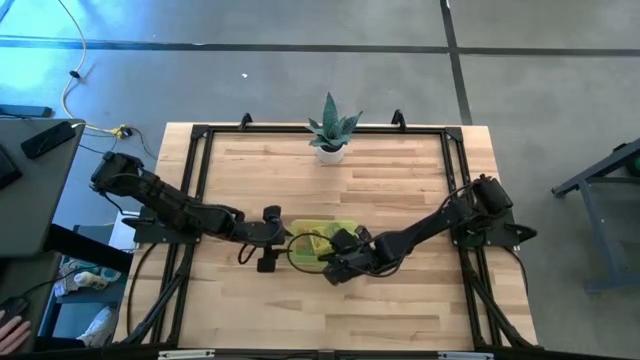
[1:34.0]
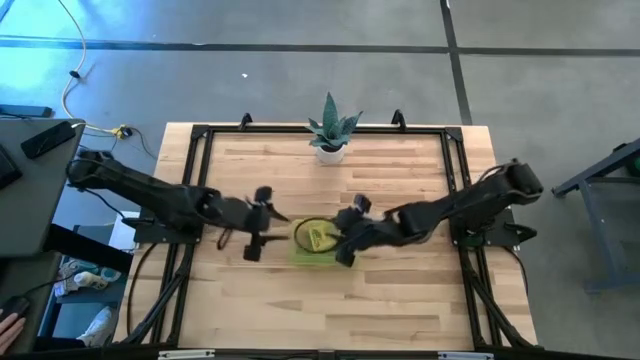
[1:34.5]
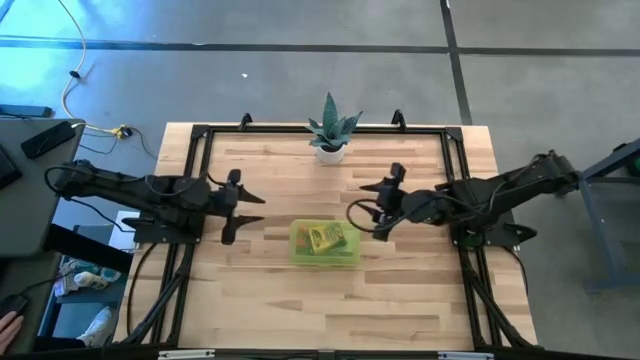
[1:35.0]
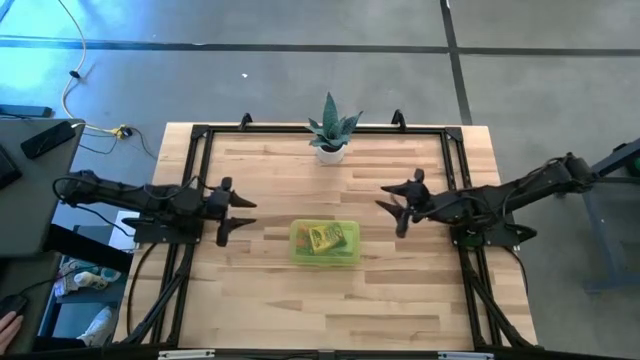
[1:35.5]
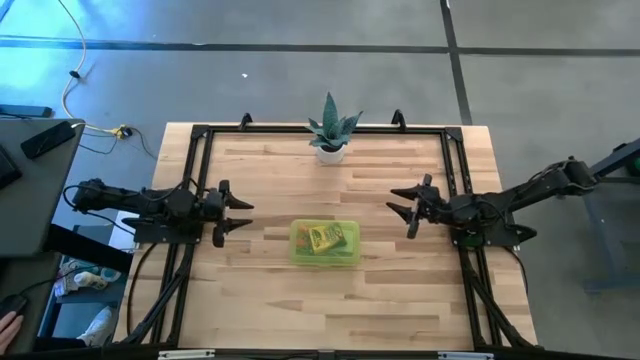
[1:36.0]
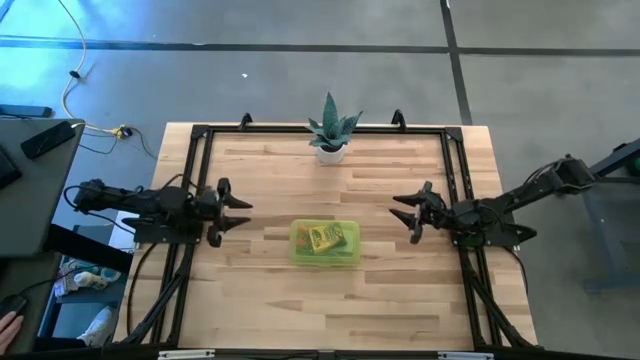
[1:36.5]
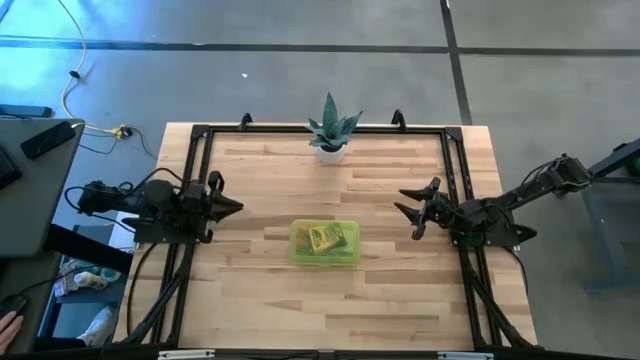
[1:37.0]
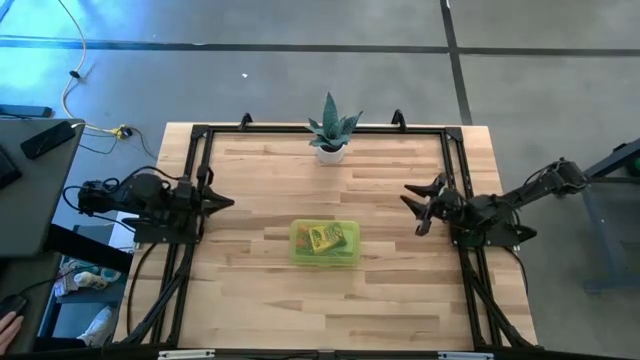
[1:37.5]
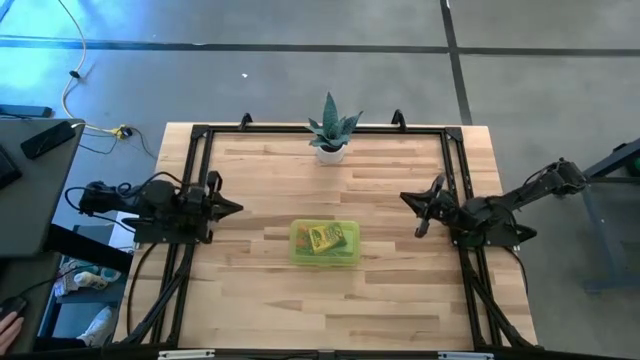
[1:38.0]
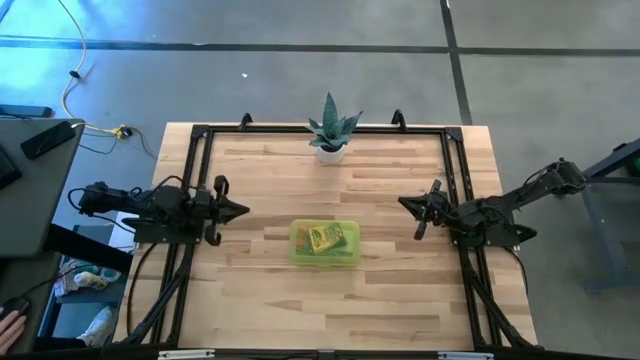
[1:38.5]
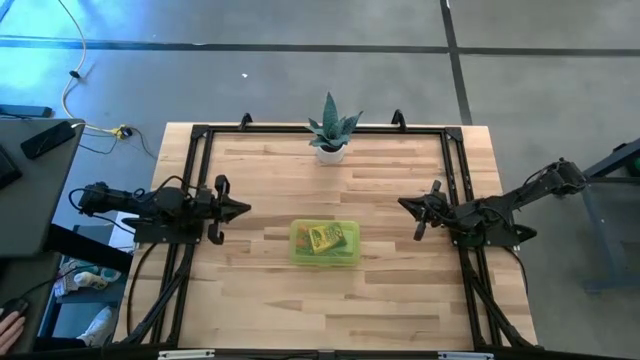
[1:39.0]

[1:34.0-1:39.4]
Task: Pack school essentials
Return to Home Position

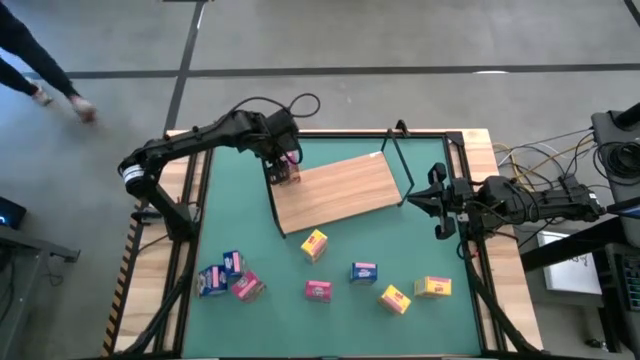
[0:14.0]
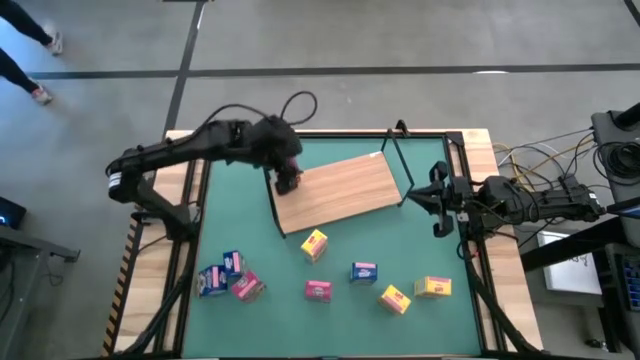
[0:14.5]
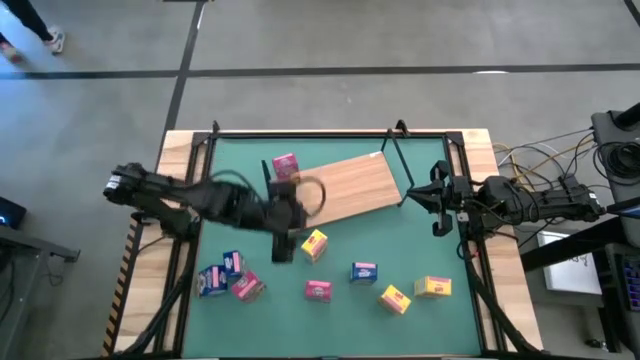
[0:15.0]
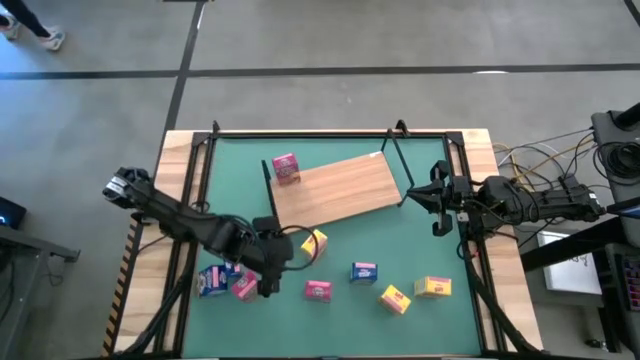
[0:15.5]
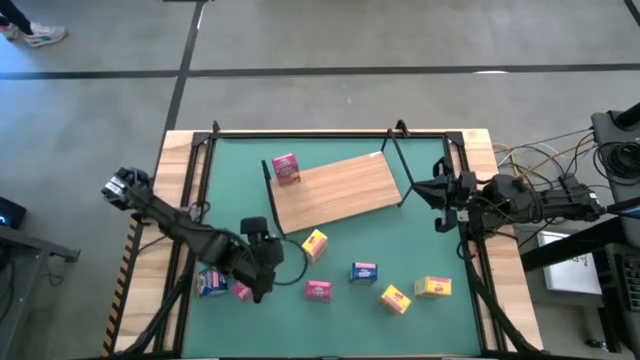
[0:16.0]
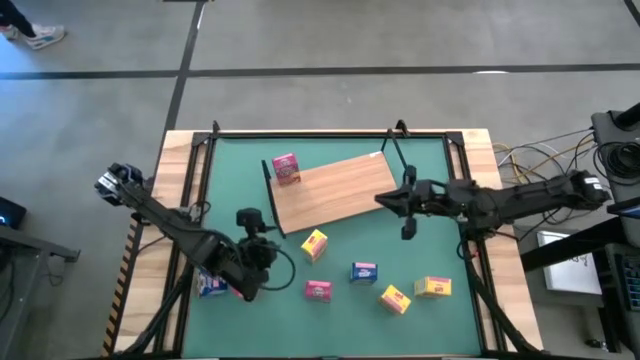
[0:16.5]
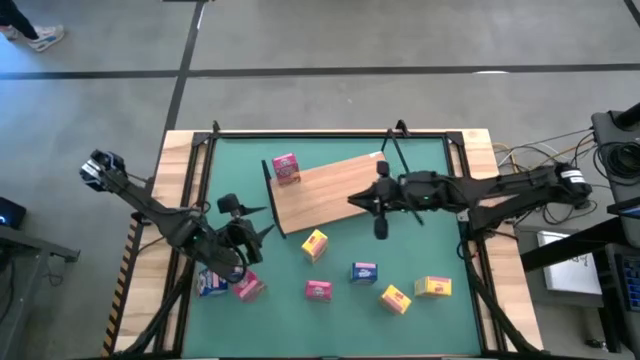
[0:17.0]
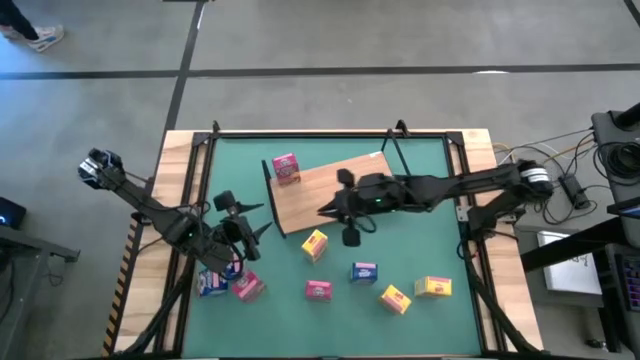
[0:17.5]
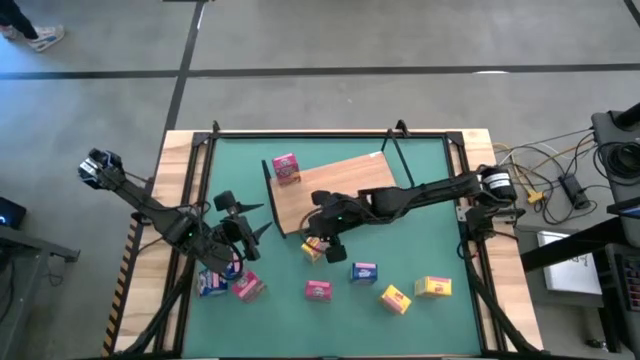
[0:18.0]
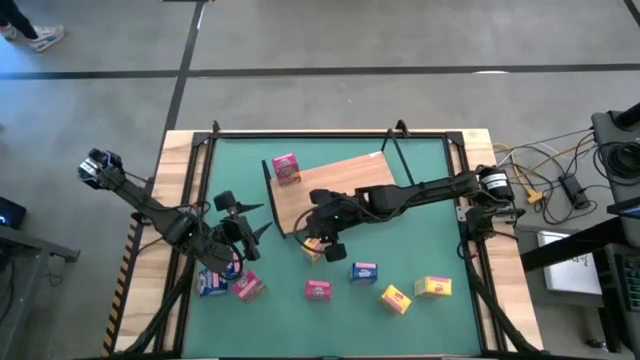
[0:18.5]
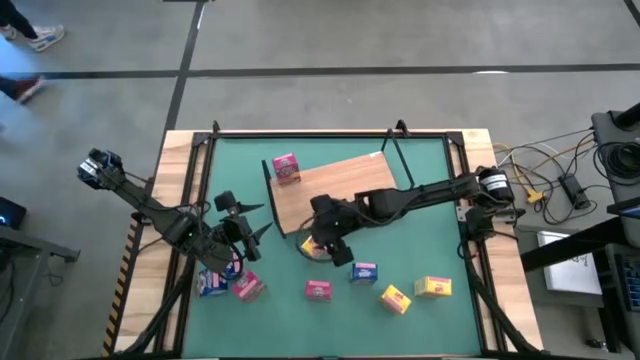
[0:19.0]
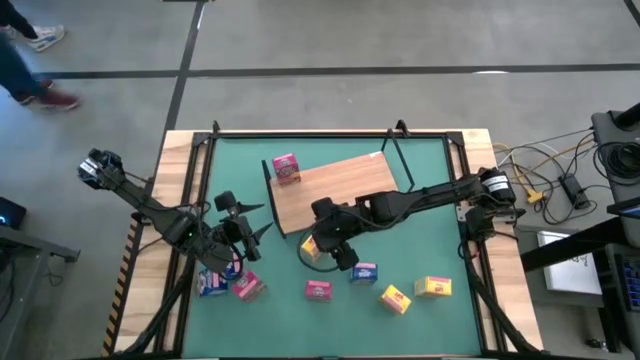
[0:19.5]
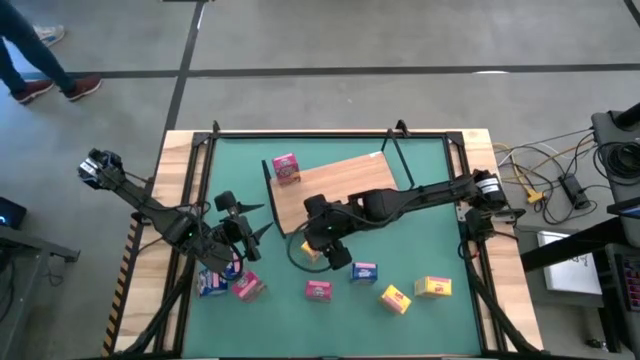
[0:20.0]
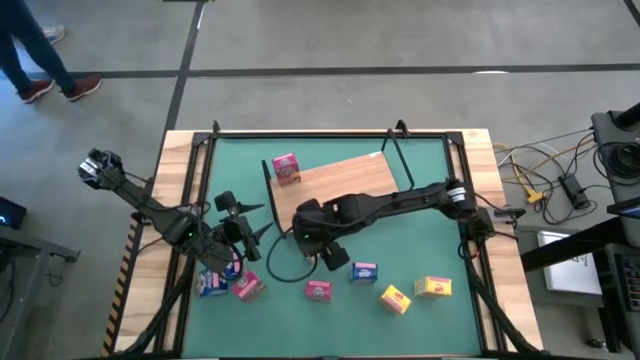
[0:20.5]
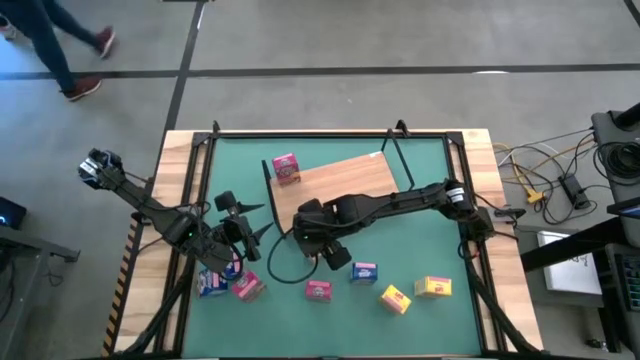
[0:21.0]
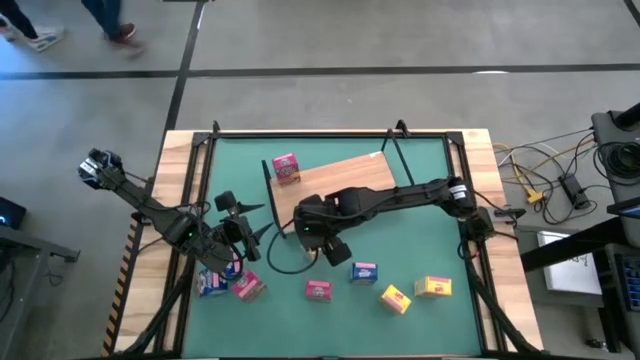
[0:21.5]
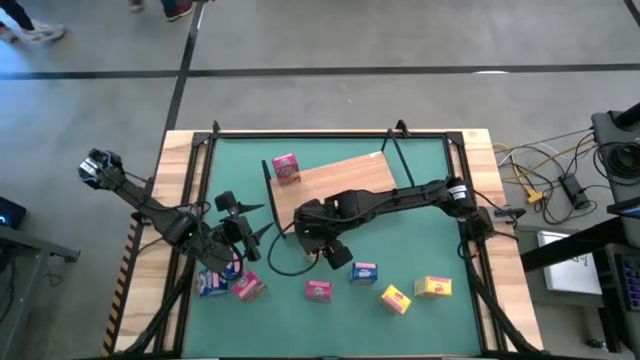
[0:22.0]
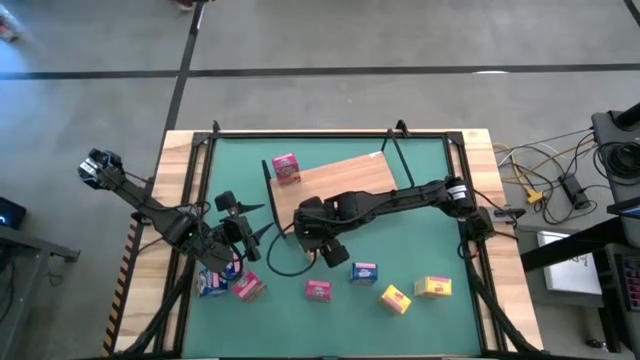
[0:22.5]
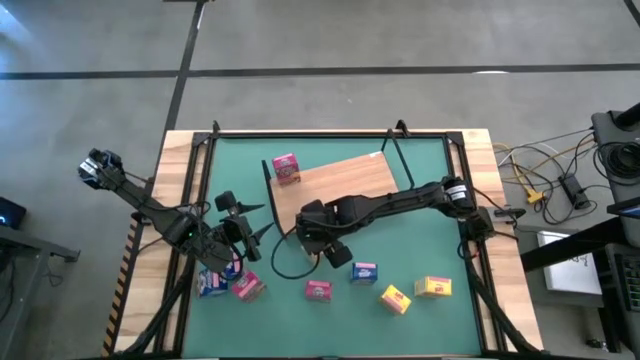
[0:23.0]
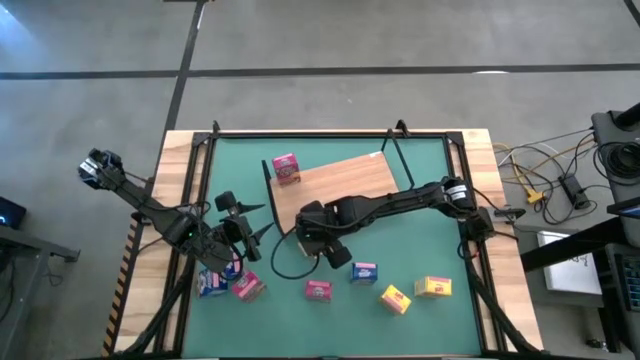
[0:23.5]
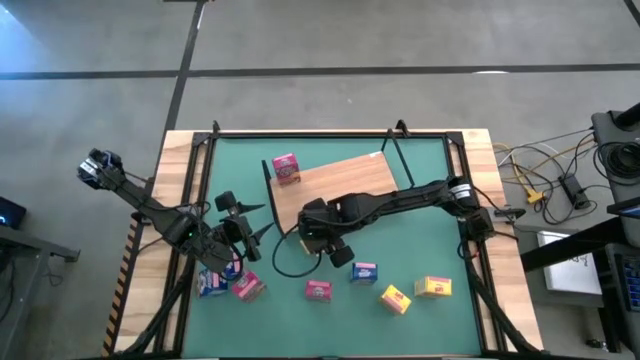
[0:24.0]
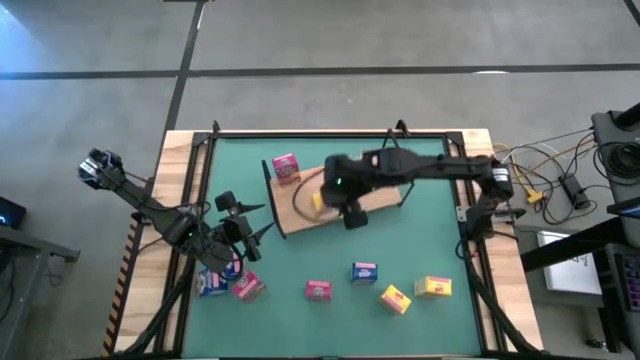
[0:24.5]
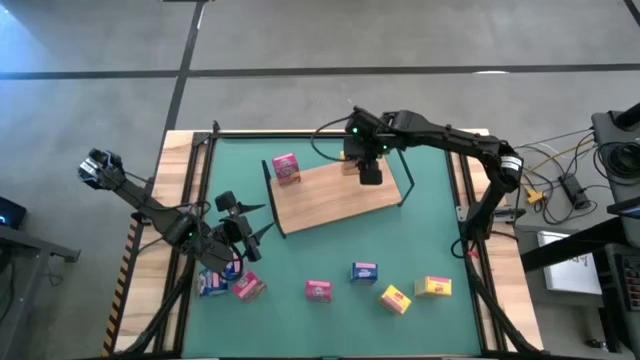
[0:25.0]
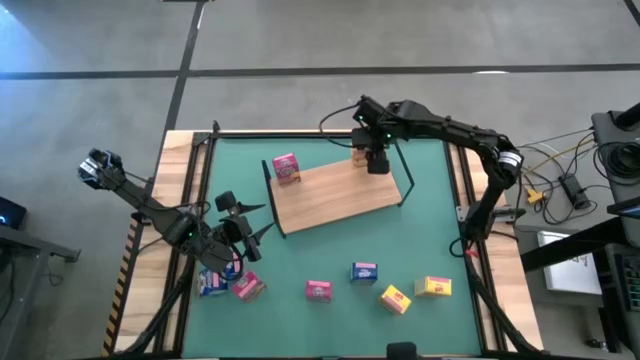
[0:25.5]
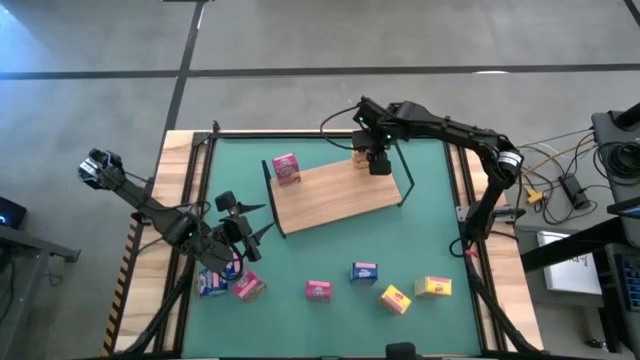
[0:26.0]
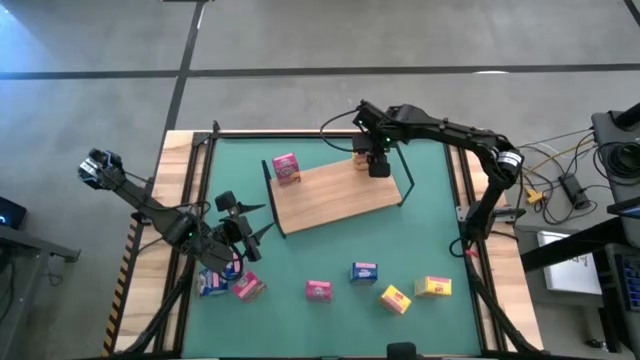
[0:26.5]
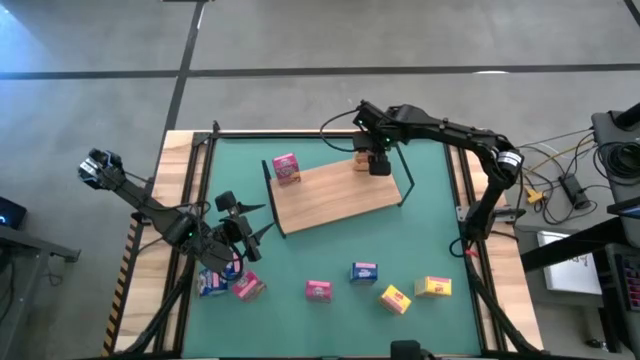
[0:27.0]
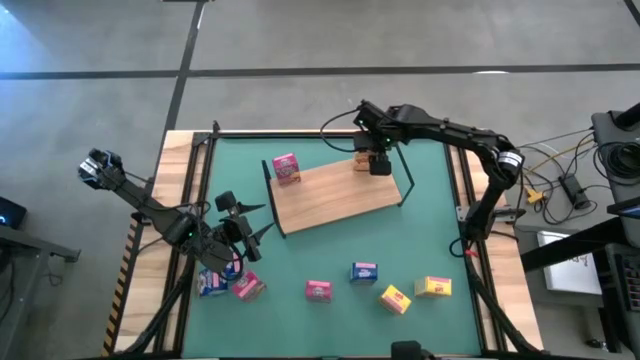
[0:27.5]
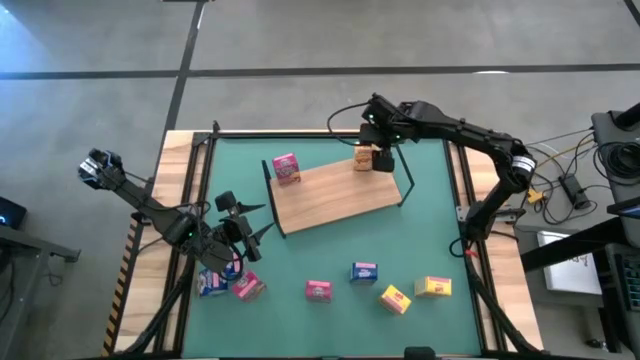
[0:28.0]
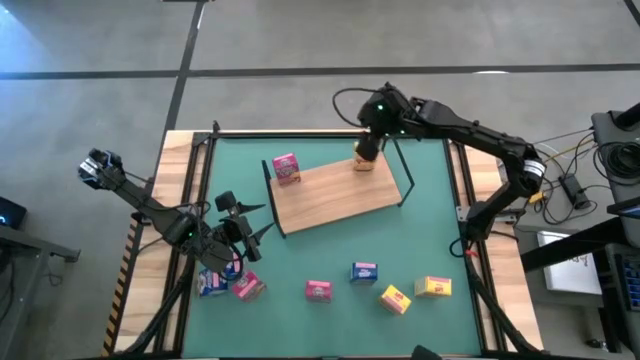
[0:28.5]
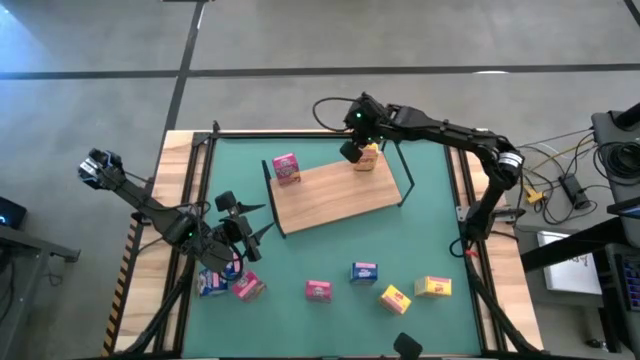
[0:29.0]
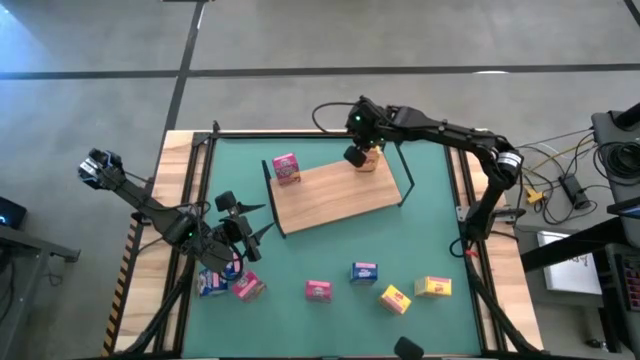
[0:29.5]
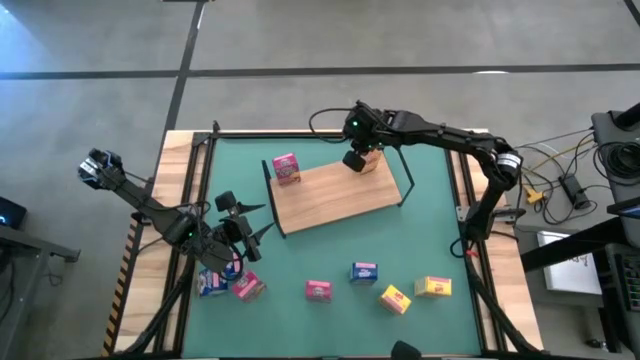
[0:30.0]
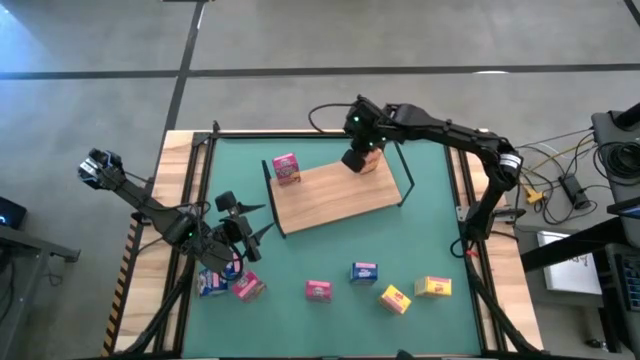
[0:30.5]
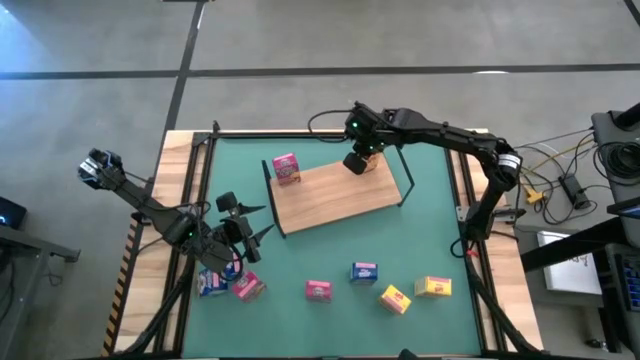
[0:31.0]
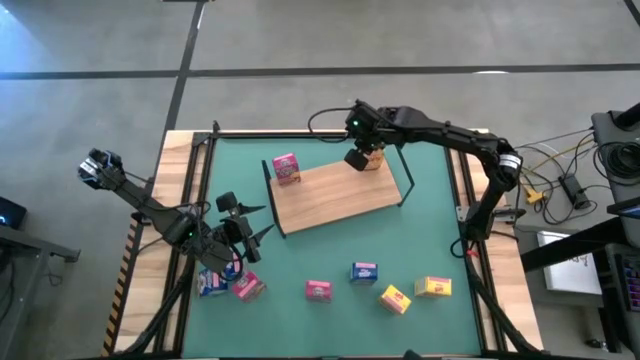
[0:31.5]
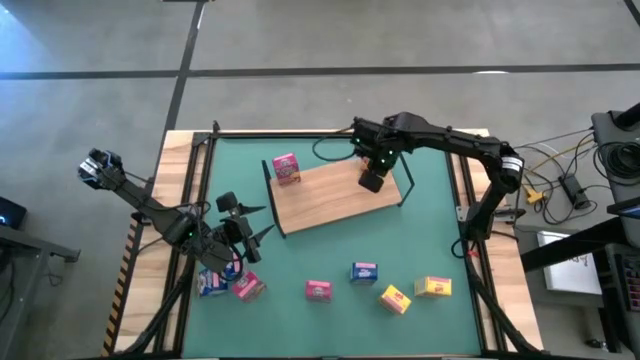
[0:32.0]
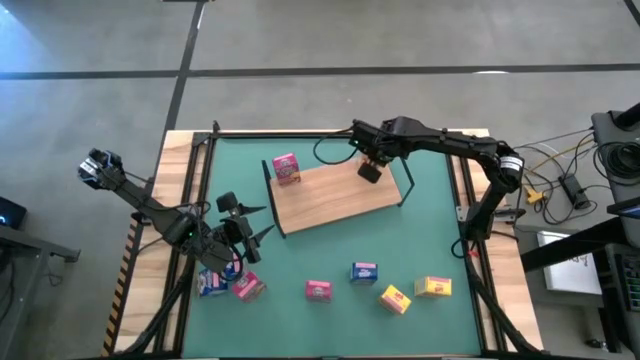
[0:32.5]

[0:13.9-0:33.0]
Task: Stack cereal on shelf
Put the top yellow cereal box on the shelf
